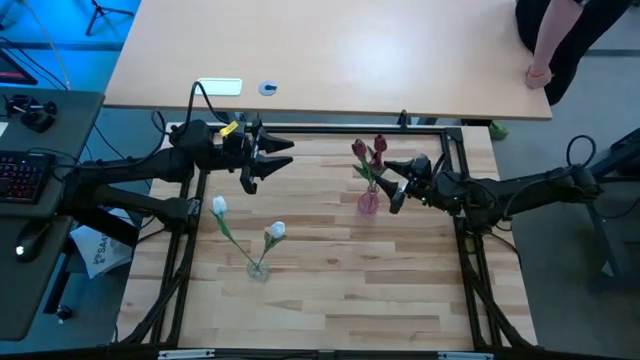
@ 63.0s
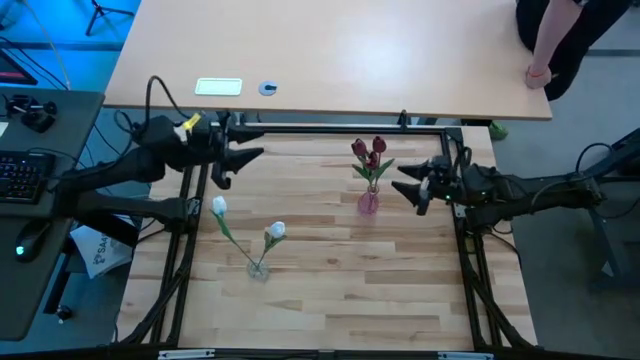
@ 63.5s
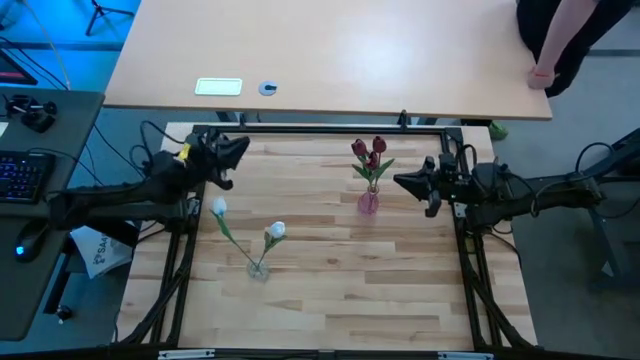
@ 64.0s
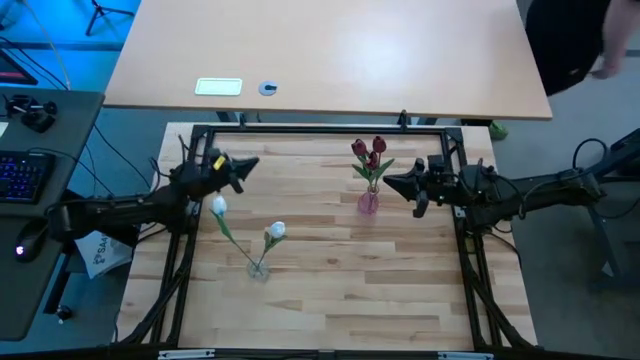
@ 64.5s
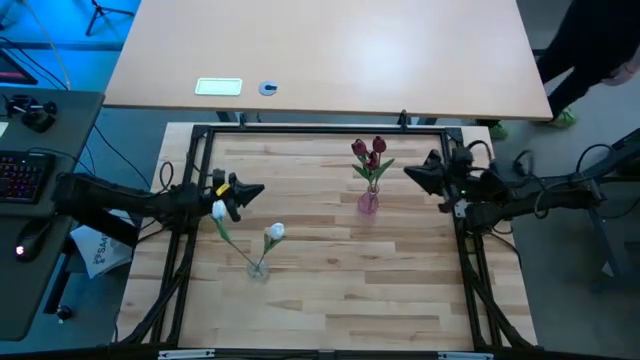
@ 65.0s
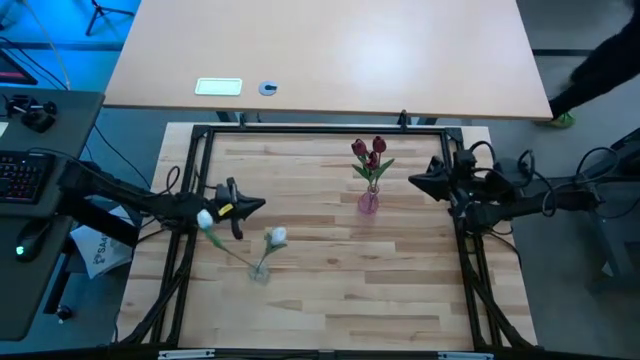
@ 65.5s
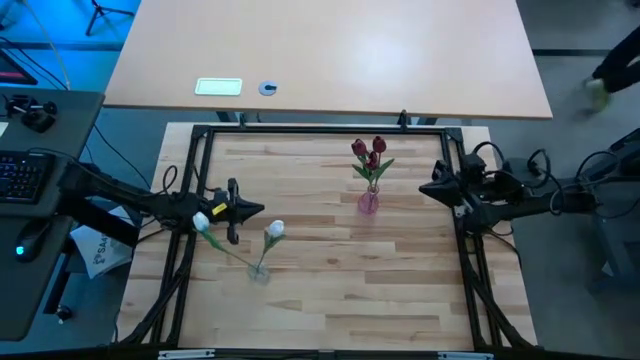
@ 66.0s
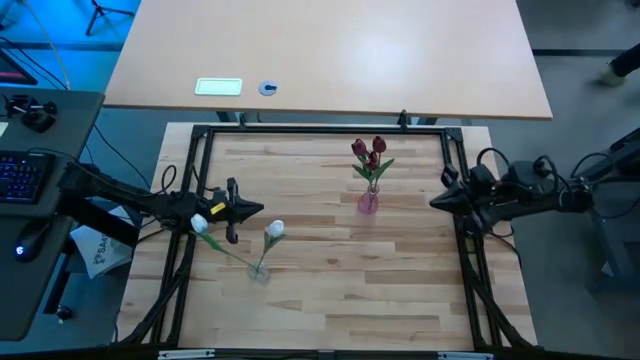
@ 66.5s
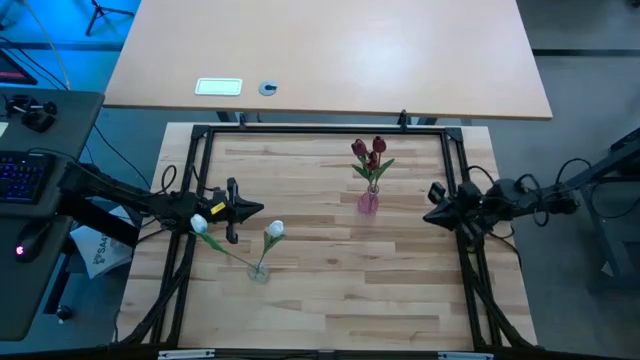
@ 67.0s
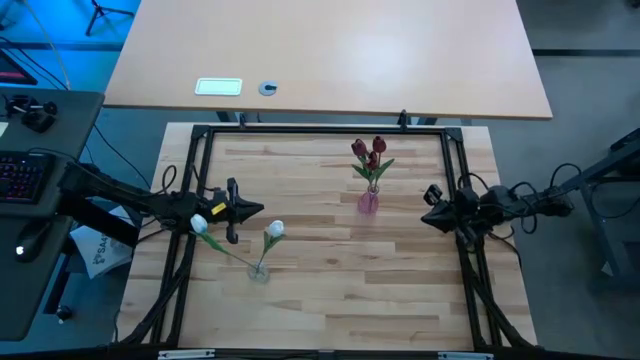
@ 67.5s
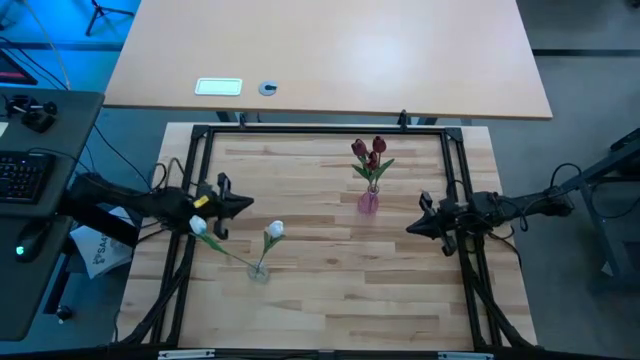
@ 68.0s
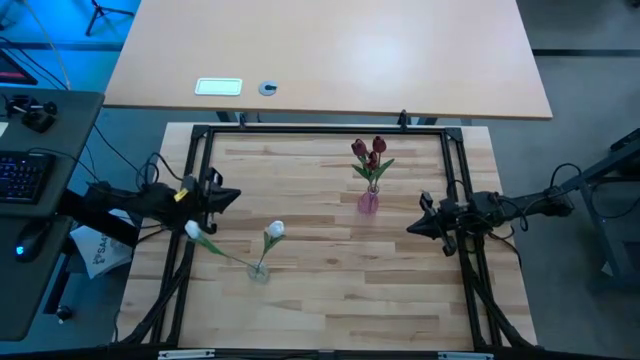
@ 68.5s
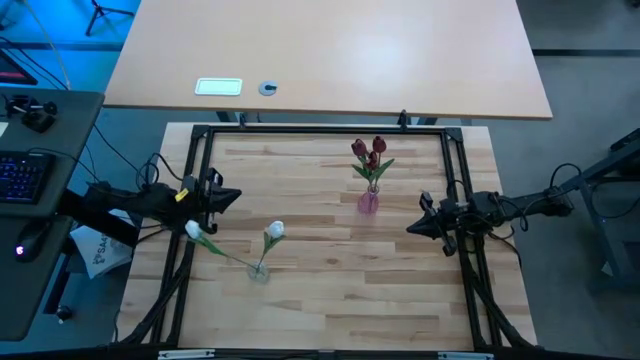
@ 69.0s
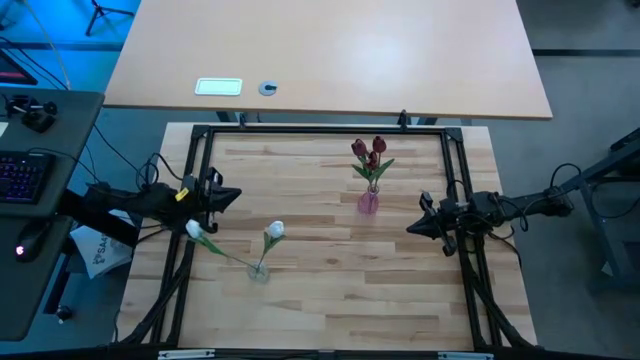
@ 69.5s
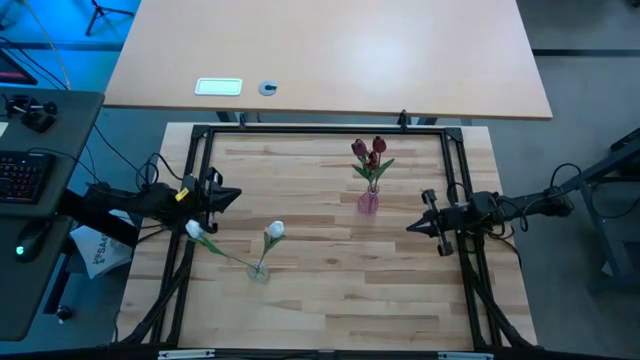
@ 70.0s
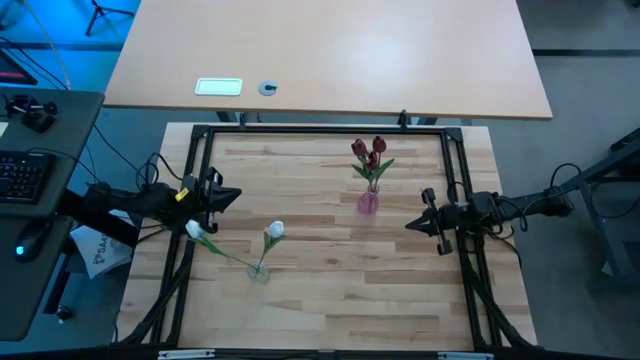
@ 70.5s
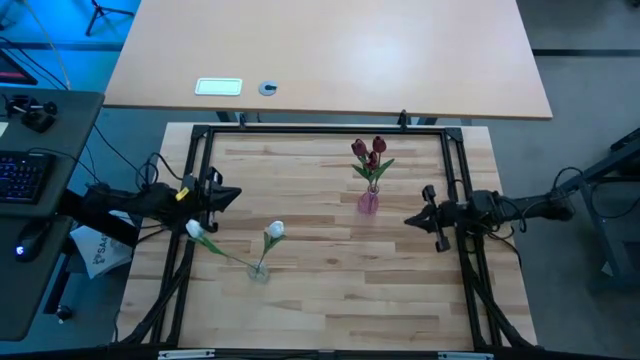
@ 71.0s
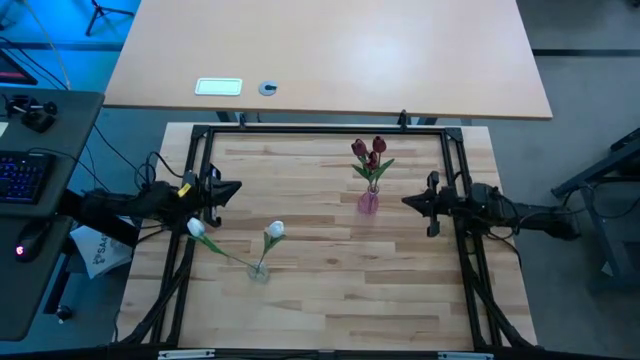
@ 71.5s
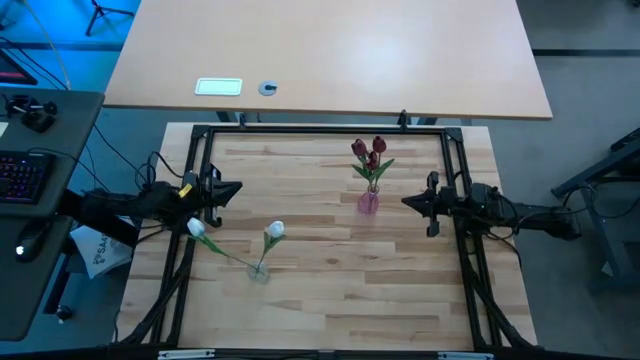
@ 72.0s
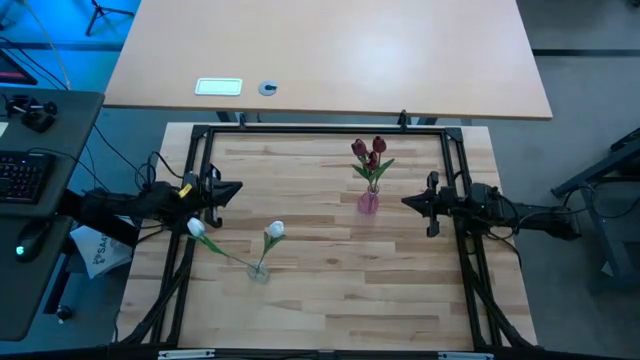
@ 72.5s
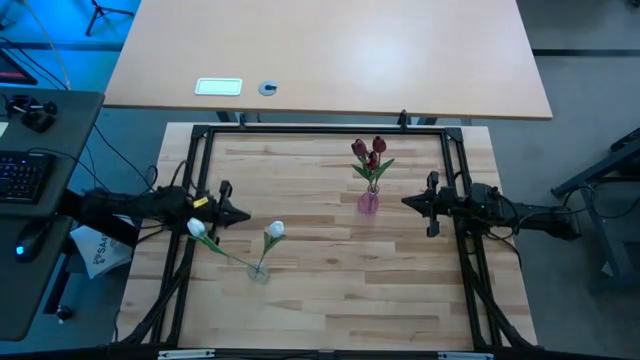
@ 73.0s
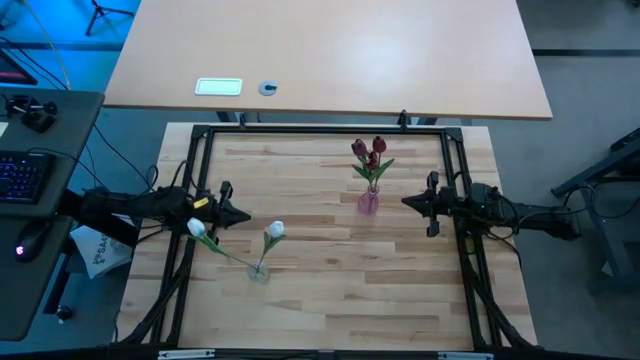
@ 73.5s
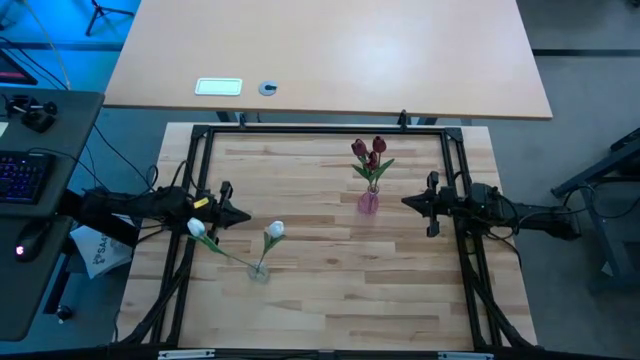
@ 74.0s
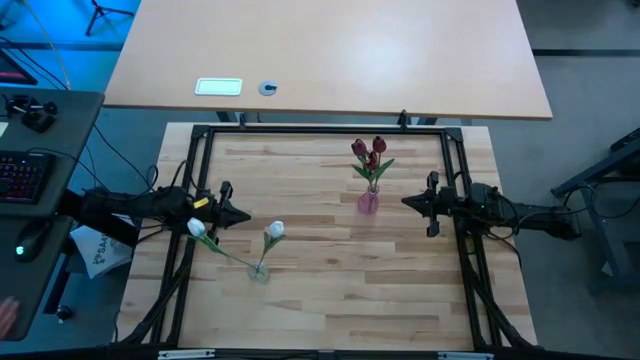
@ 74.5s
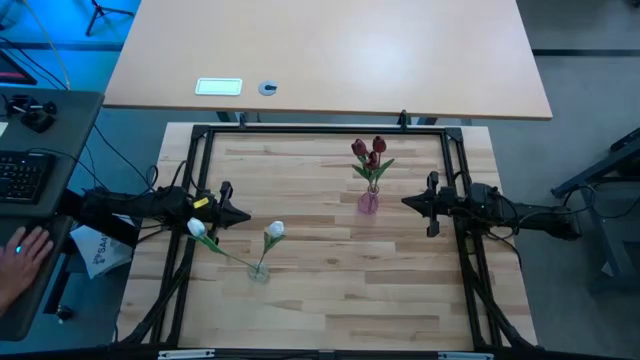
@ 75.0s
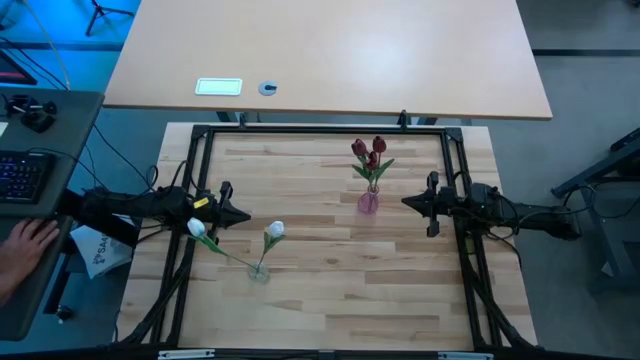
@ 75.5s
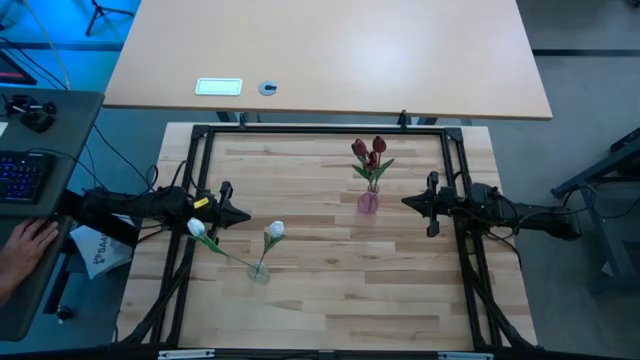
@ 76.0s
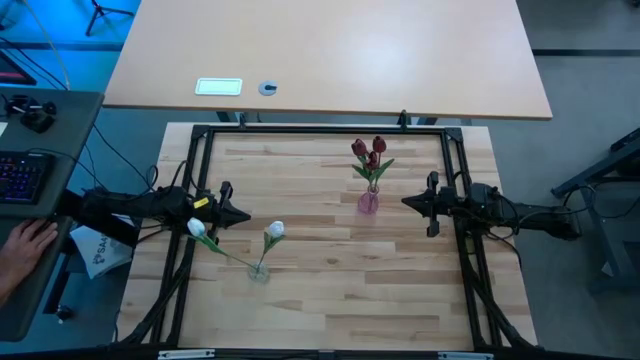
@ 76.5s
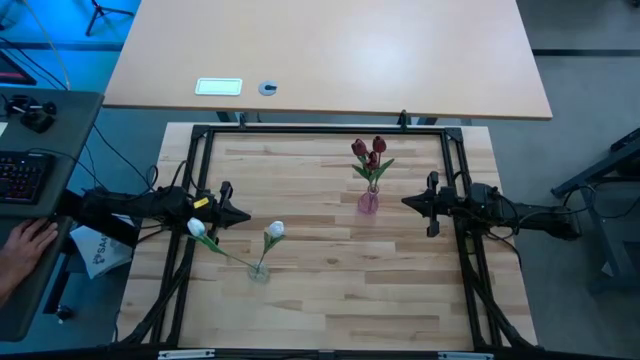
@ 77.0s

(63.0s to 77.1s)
Task: Sort flowers into vase by color
Return to Home Position

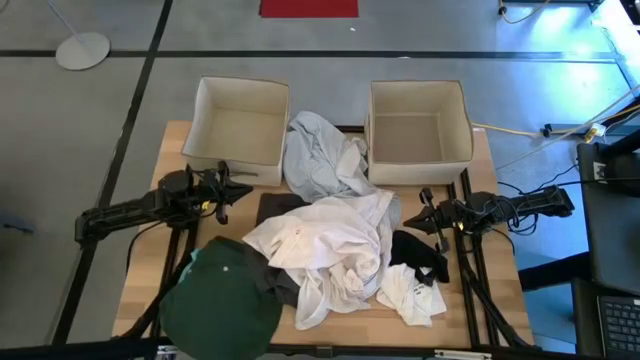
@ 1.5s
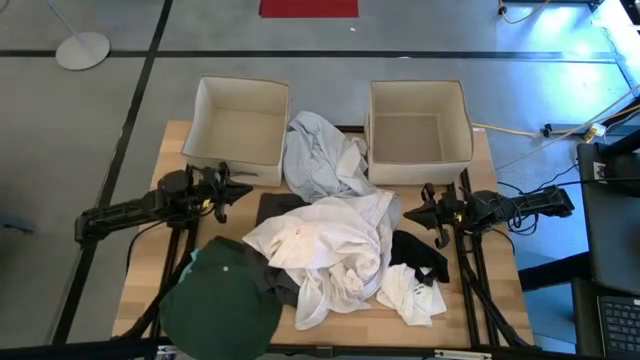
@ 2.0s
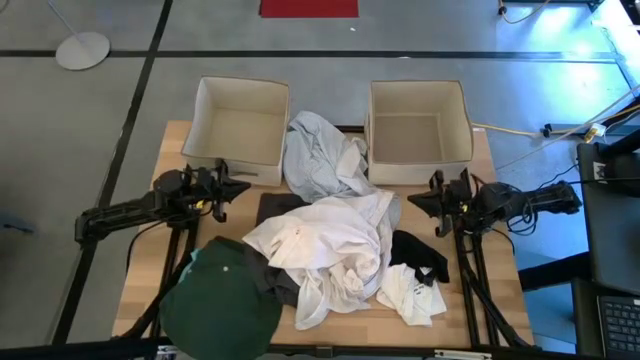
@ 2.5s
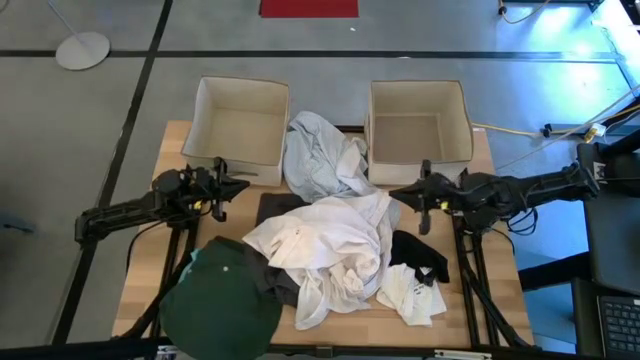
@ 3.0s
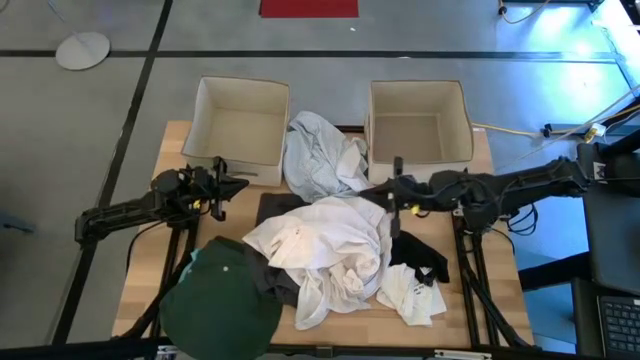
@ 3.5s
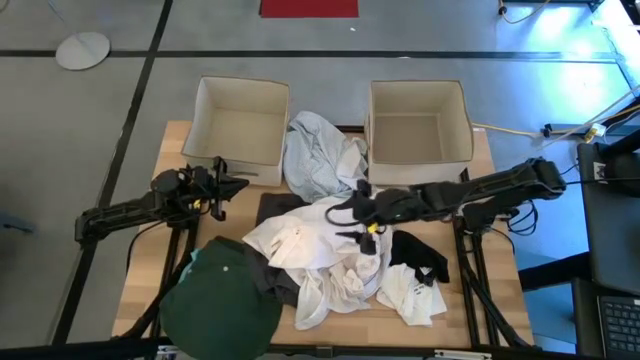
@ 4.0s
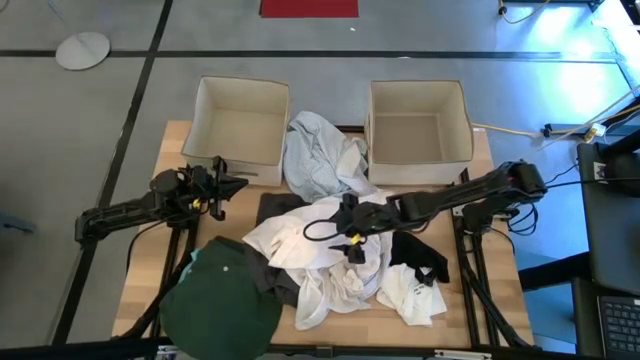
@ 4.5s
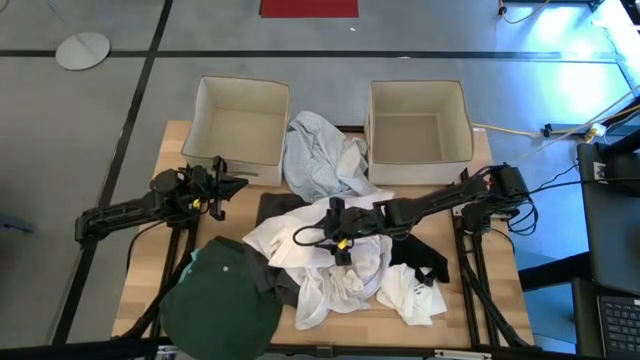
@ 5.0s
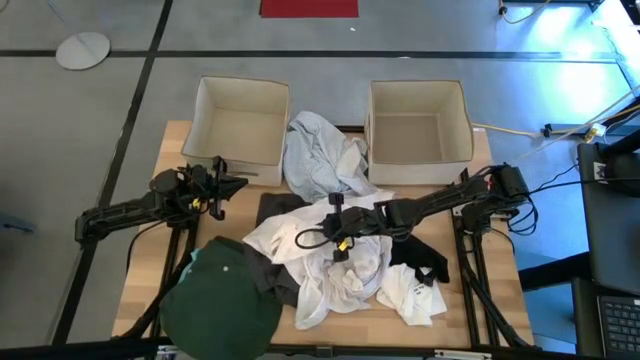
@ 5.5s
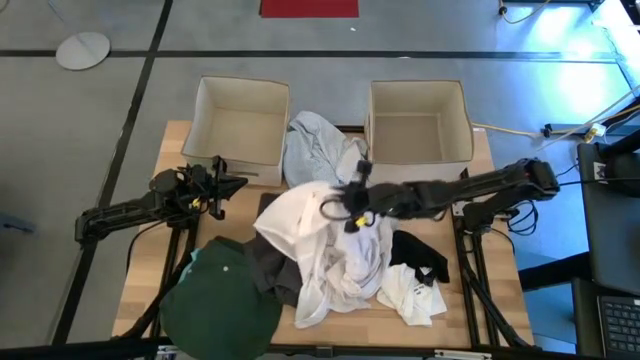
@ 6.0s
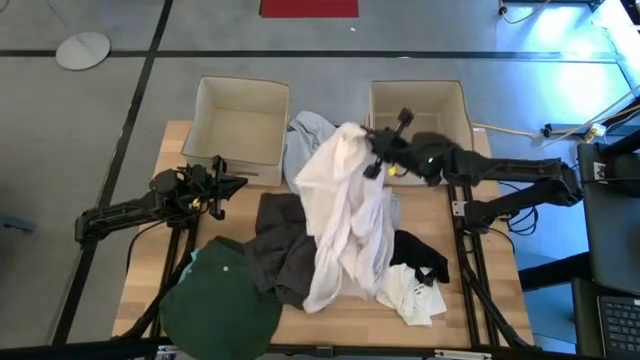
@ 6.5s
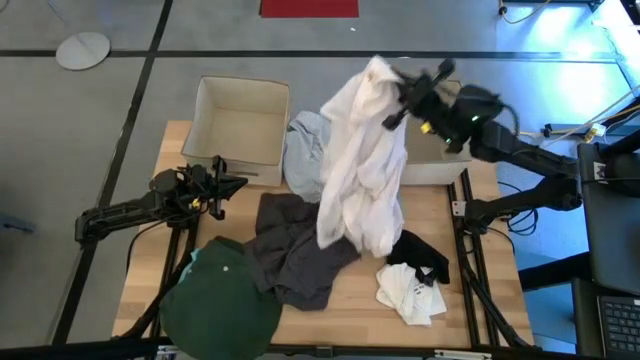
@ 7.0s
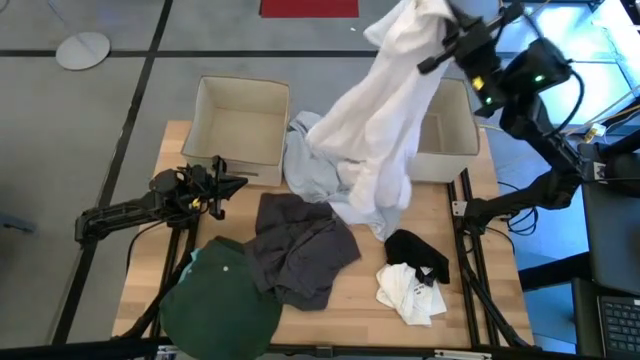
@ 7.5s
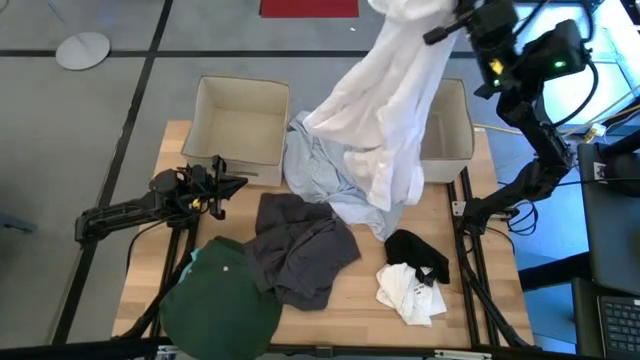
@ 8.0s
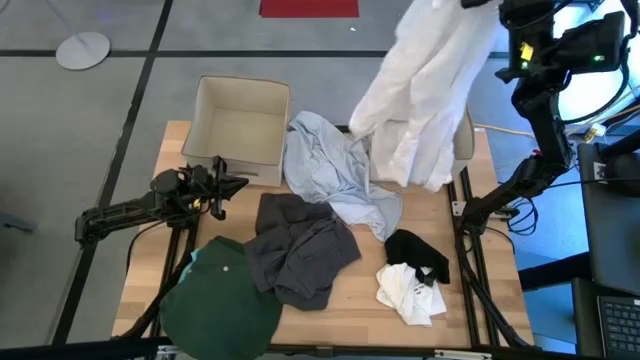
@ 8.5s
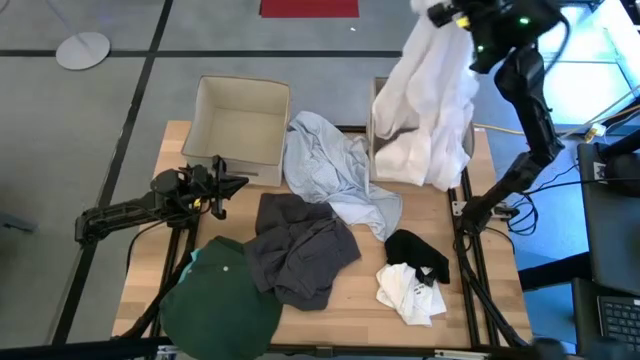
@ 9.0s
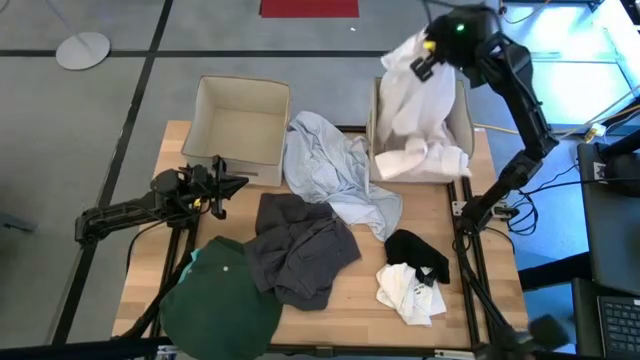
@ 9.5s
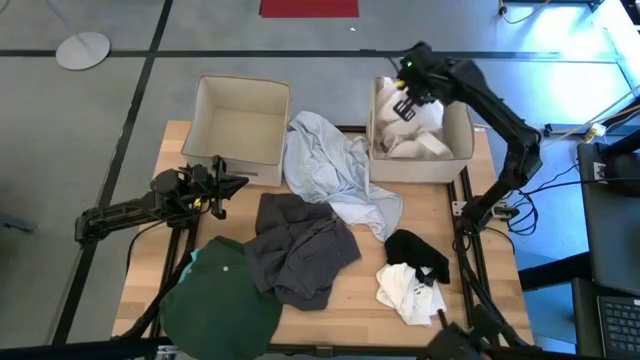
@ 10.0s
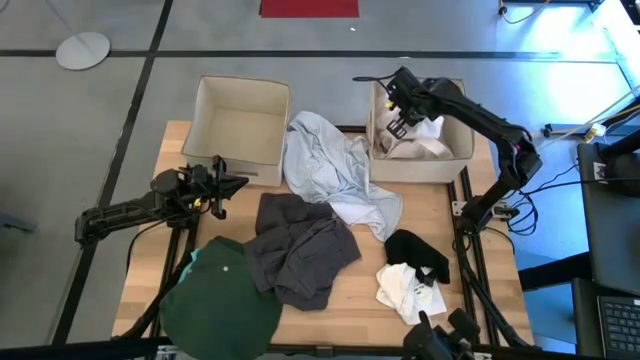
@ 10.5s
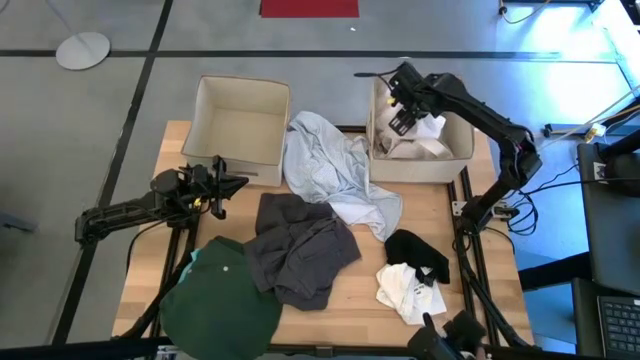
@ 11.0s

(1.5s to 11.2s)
Task: Sort clothes
Put the white shirt into the right laundry bin
